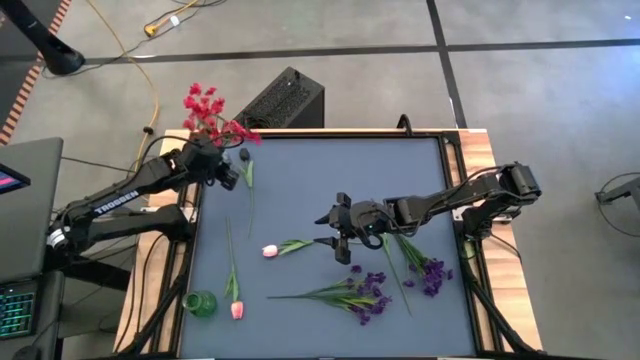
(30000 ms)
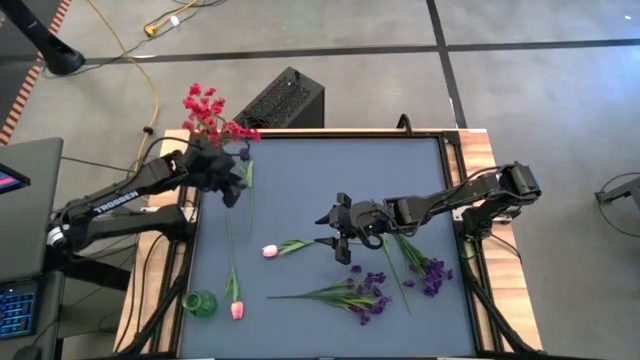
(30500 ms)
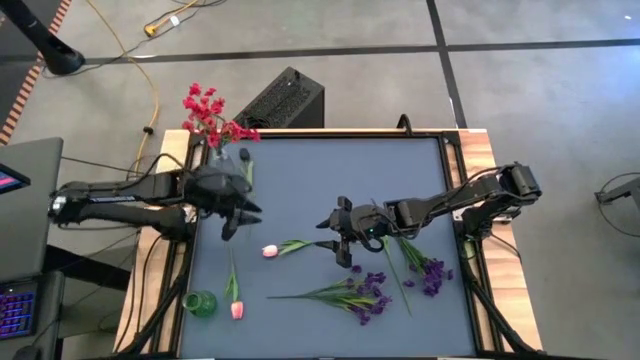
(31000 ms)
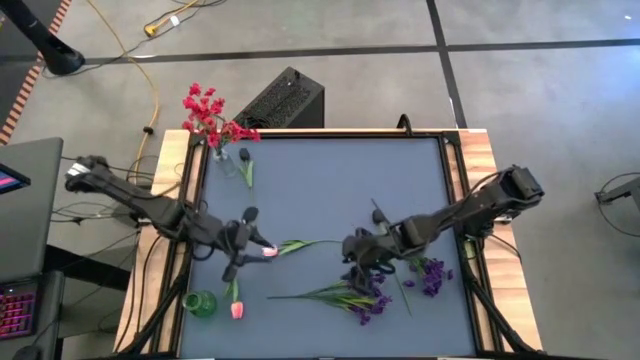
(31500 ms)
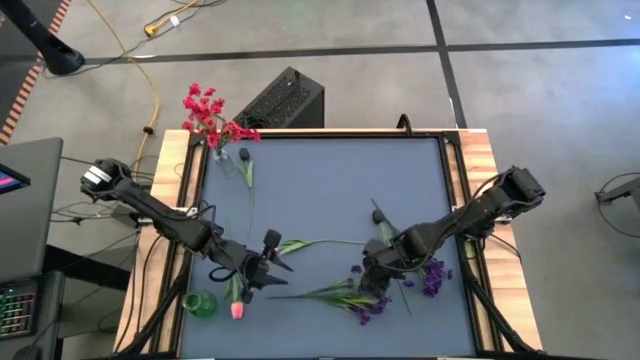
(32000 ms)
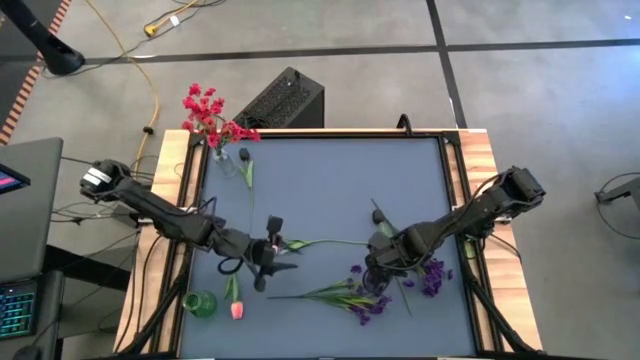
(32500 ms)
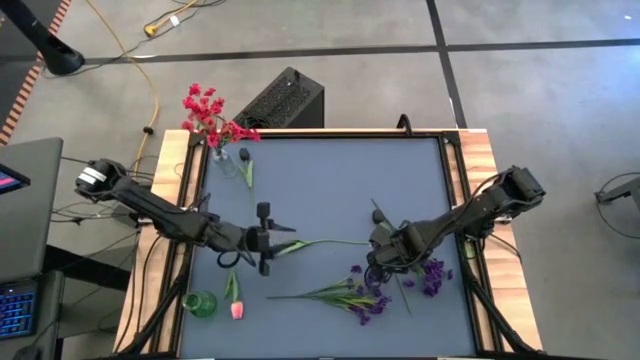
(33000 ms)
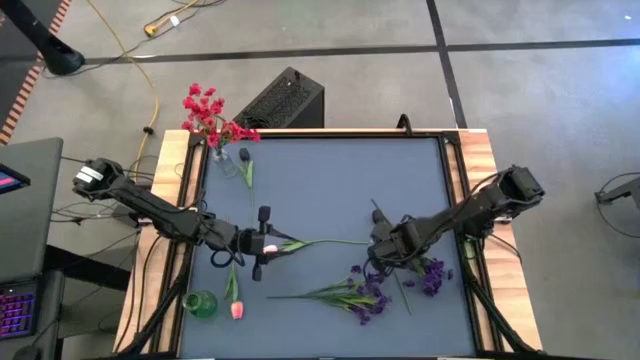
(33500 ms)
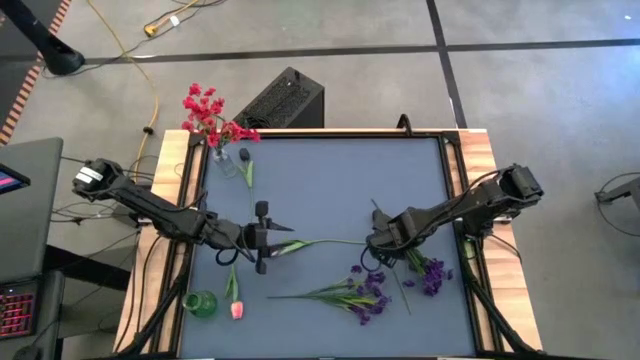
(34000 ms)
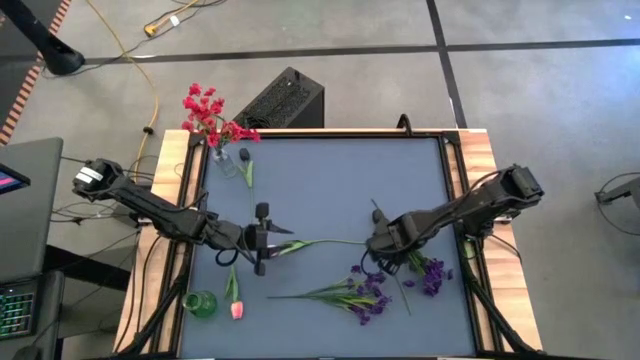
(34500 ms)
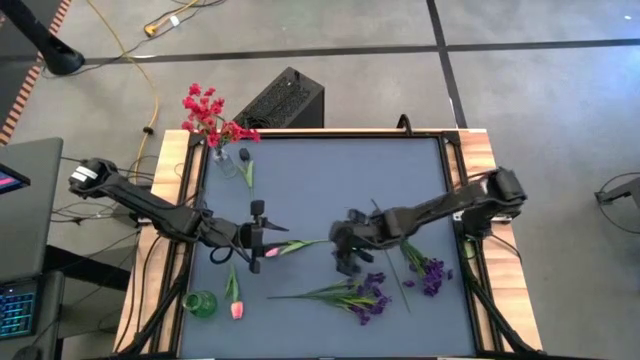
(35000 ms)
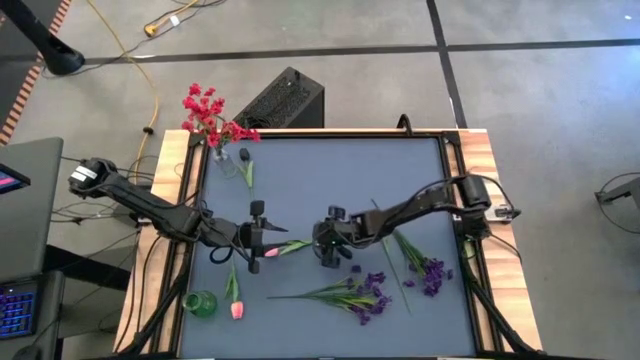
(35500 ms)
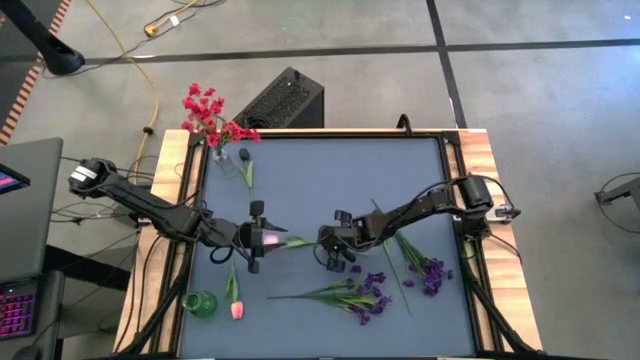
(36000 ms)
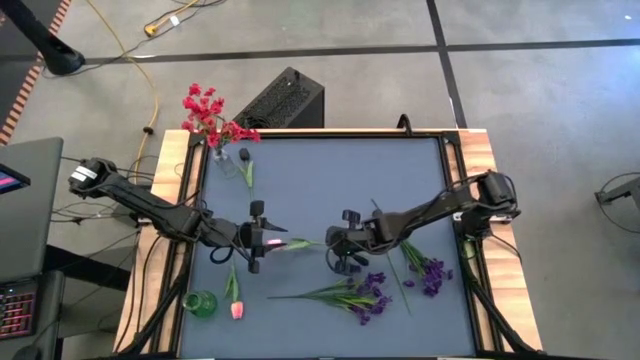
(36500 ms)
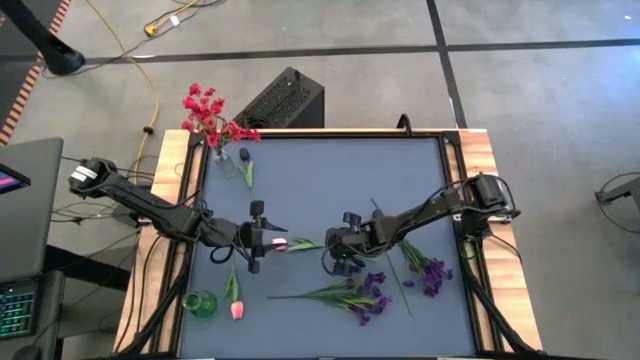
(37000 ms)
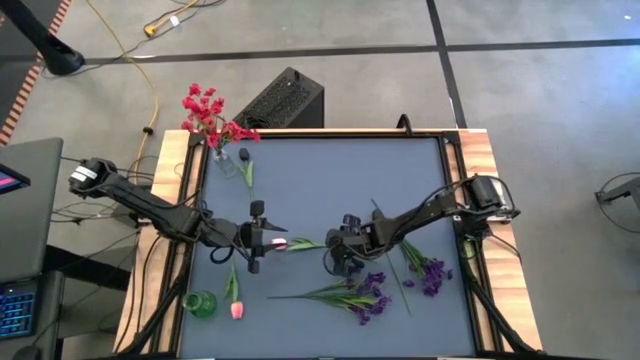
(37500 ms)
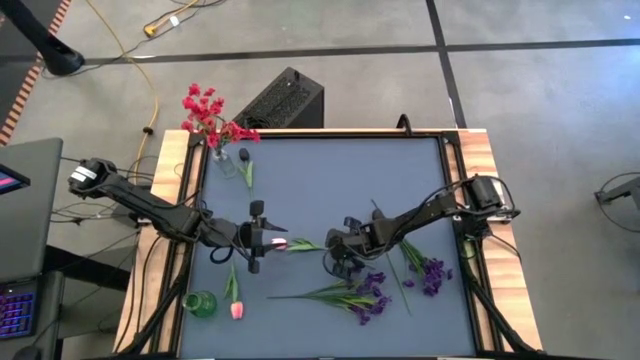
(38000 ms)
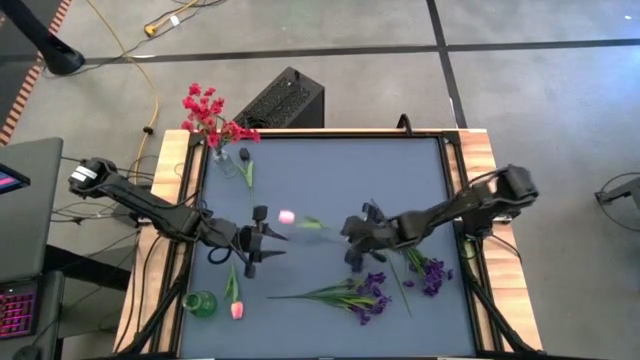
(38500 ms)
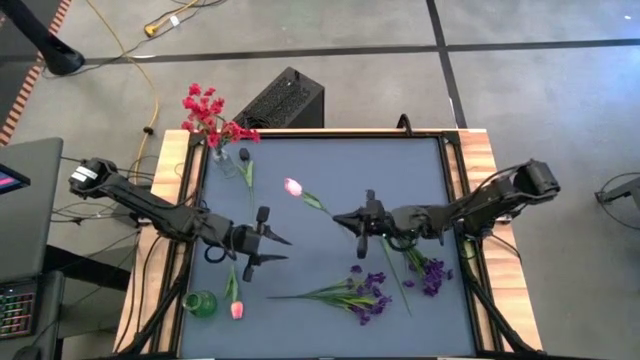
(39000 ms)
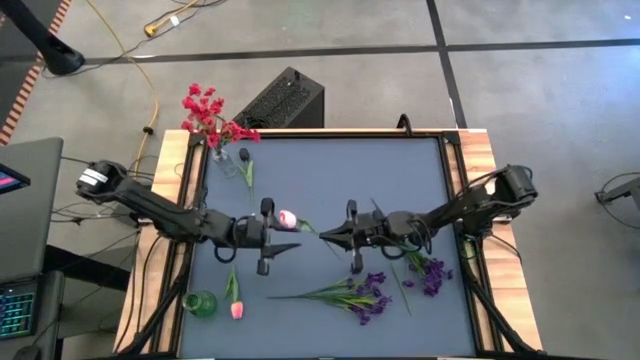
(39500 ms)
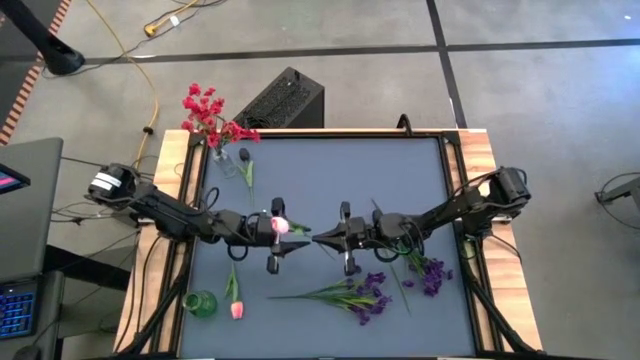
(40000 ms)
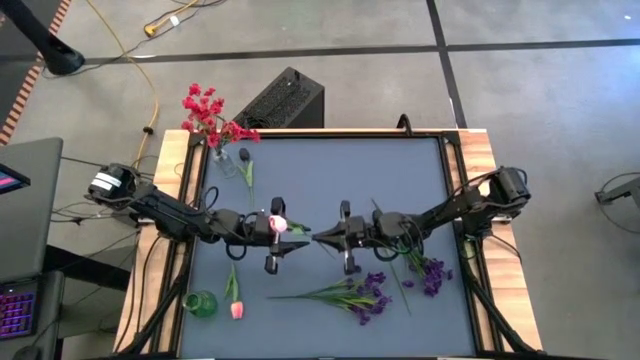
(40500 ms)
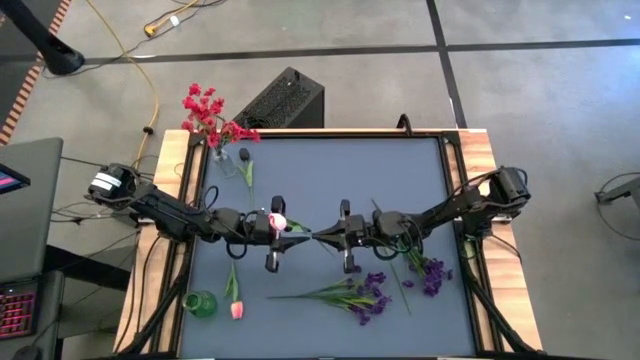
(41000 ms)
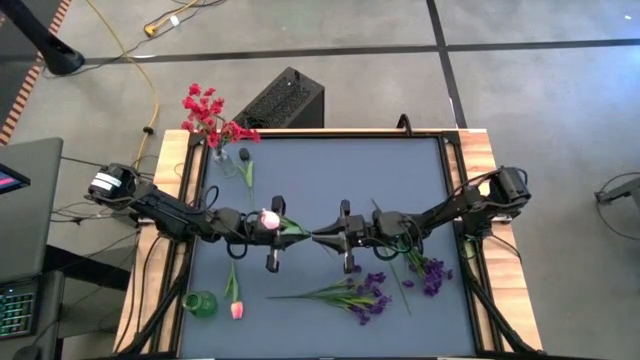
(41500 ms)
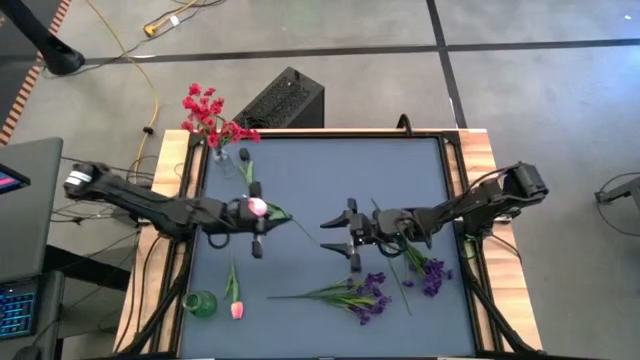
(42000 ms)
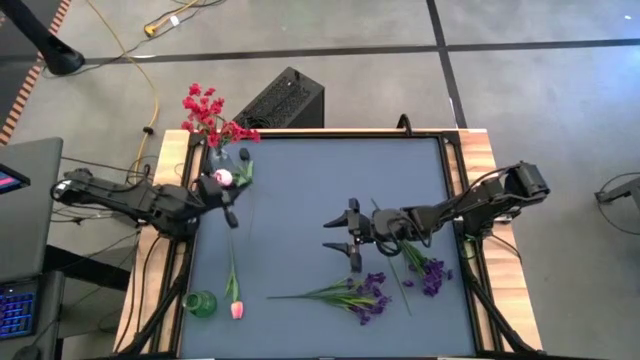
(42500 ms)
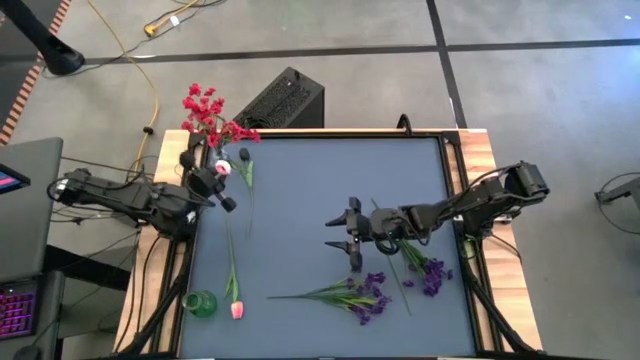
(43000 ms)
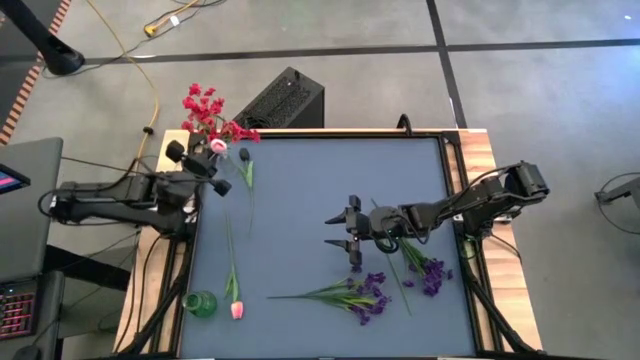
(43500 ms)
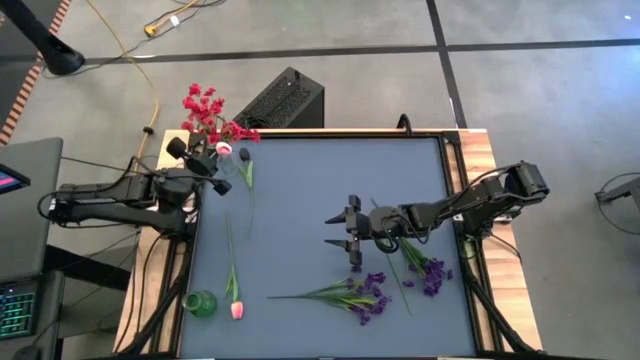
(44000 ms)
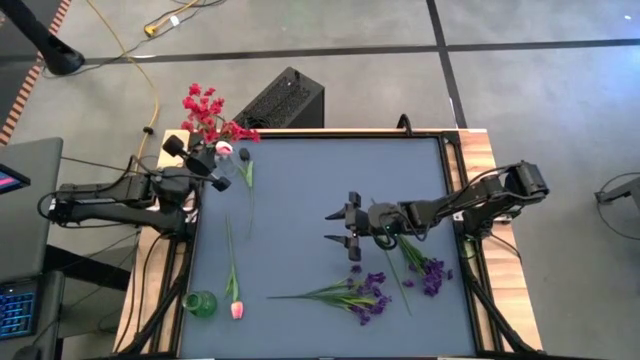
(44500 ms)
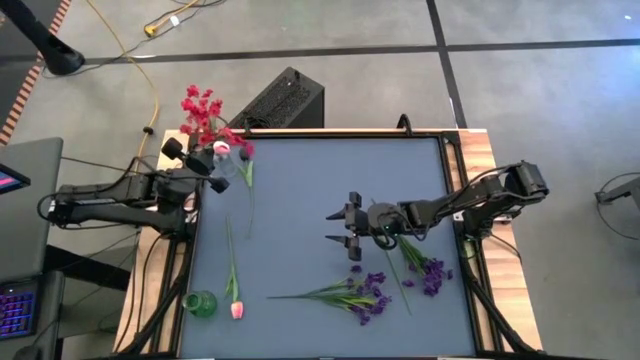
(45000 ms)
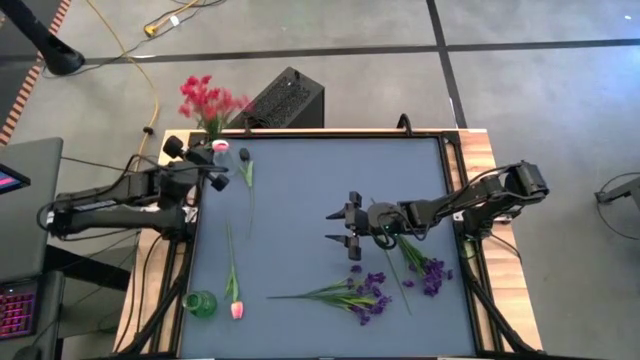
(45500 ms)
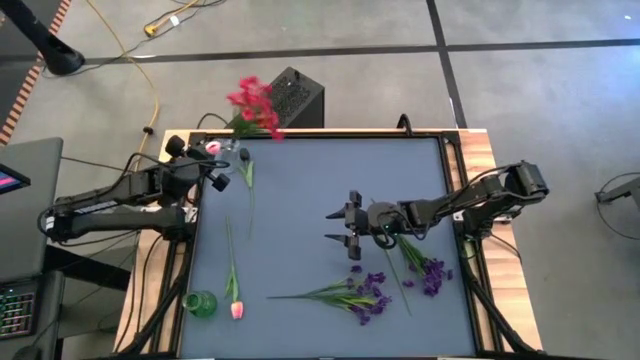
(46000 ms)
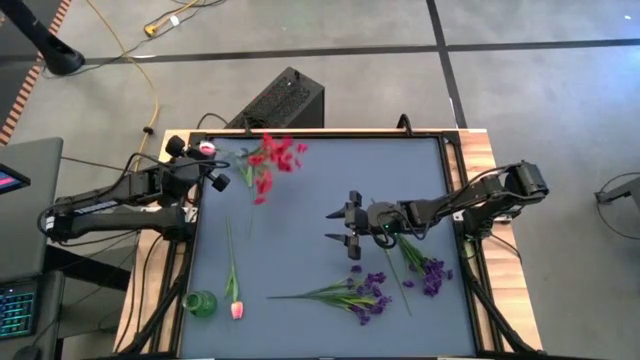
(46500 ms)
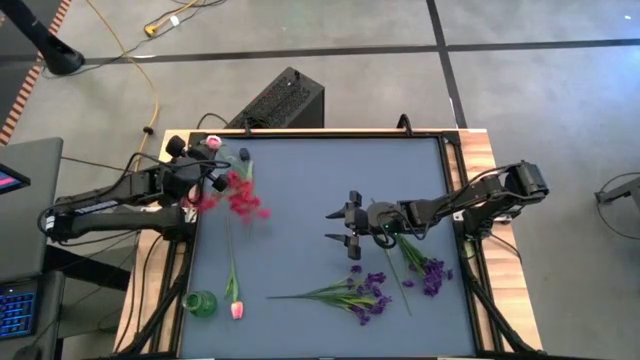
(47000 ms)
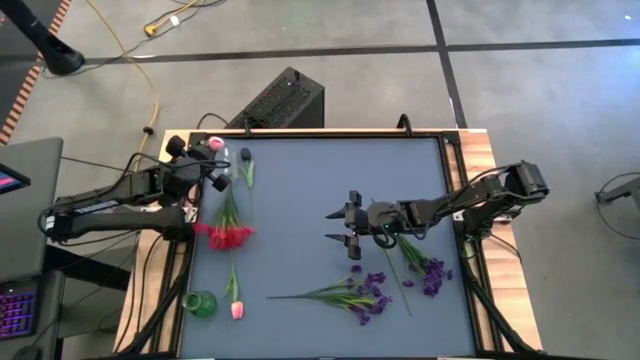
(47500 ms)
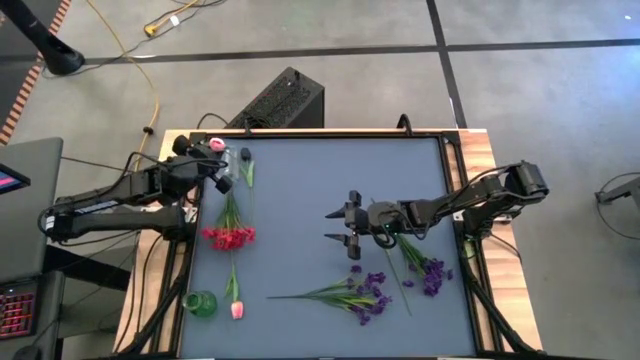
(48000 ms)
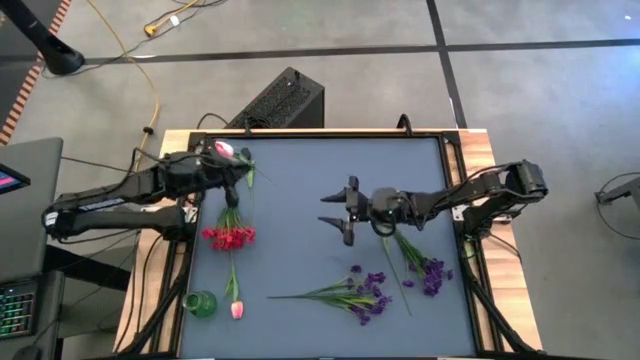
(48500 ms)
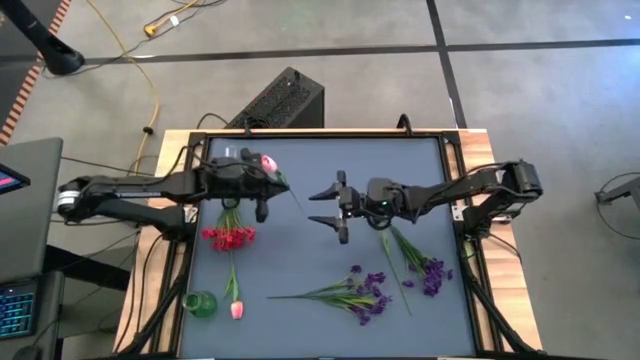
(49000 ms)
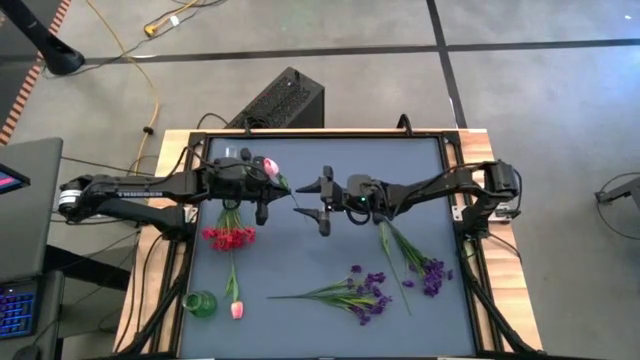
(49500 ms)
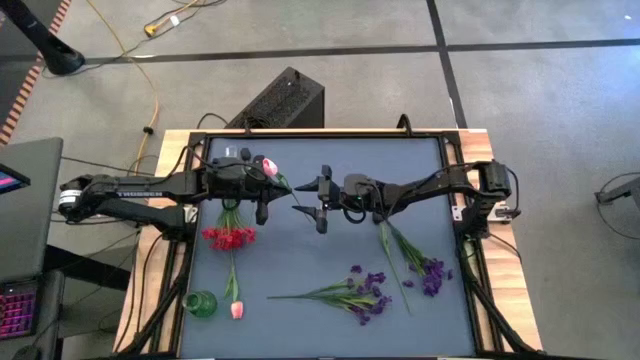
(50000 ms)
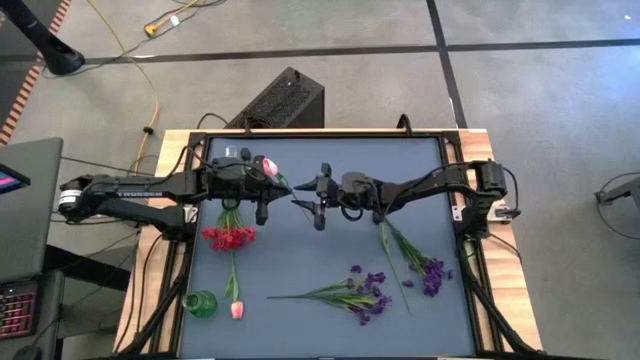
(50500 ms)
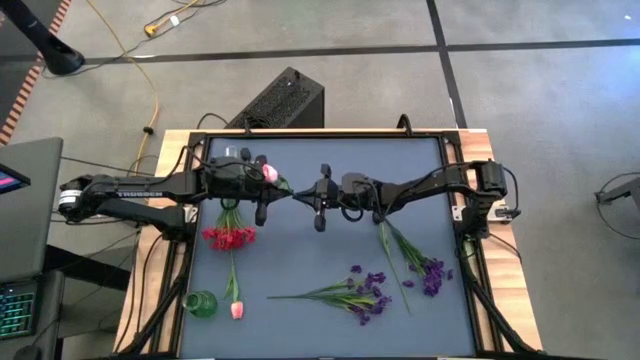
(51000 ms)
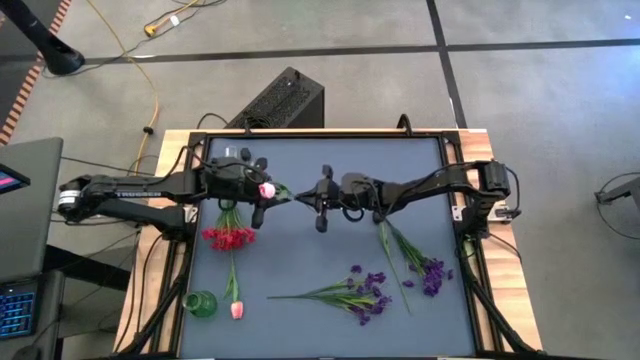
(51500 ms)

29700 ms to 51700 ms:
Task: Sort flowers into vase by color
Put the top pink tulip into the transparent vase
